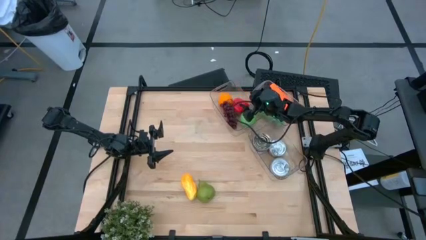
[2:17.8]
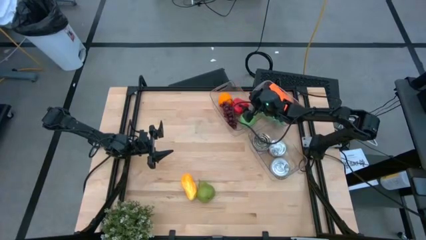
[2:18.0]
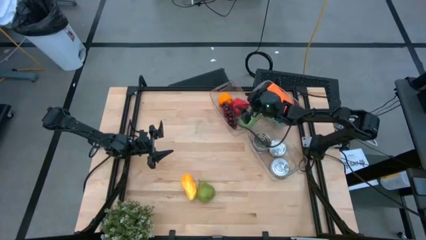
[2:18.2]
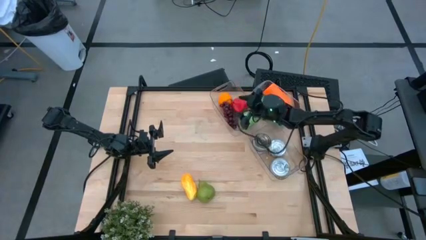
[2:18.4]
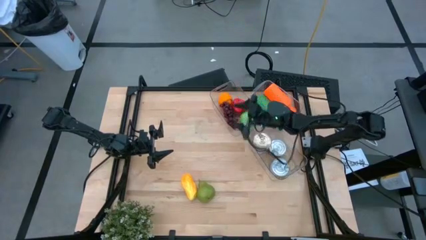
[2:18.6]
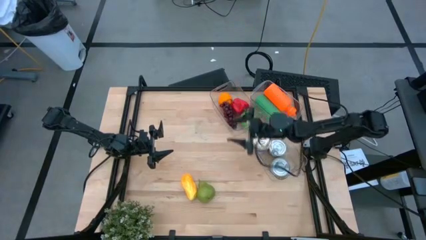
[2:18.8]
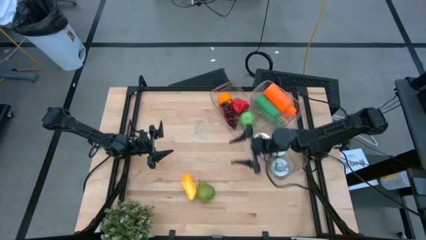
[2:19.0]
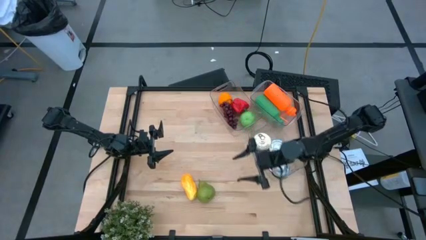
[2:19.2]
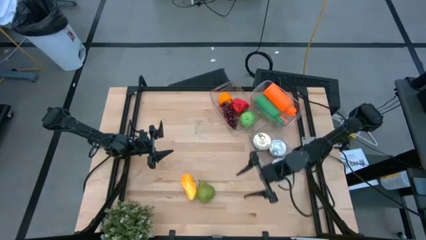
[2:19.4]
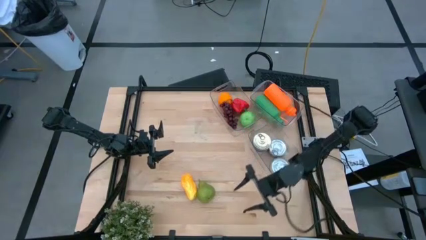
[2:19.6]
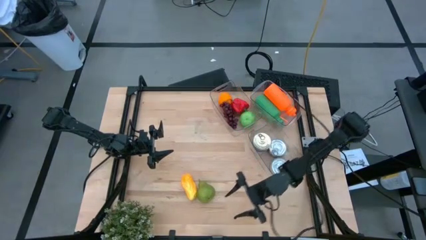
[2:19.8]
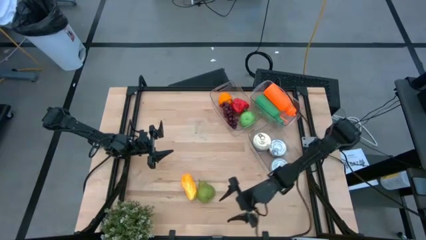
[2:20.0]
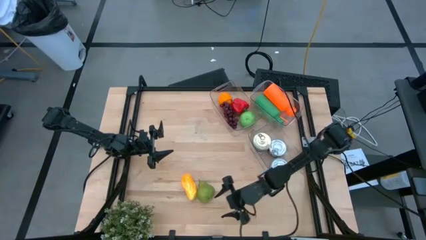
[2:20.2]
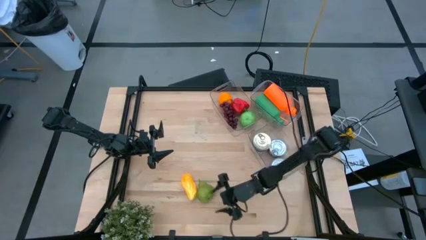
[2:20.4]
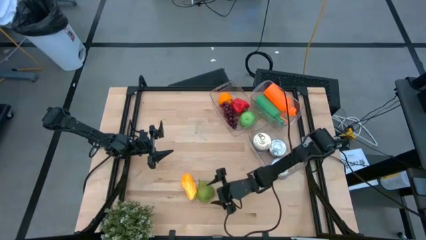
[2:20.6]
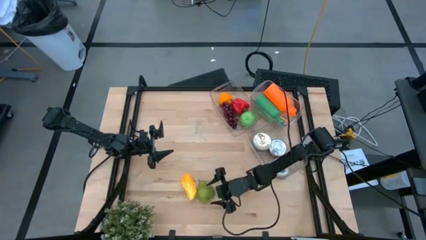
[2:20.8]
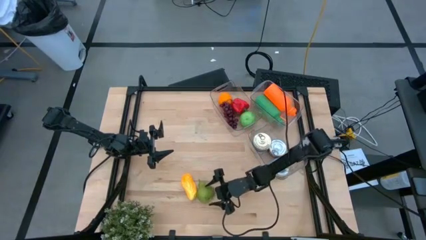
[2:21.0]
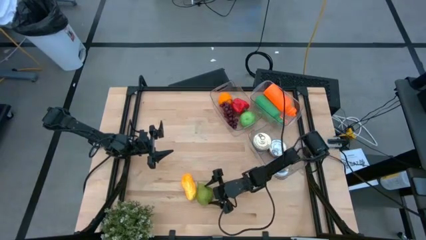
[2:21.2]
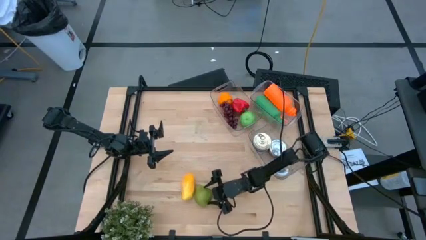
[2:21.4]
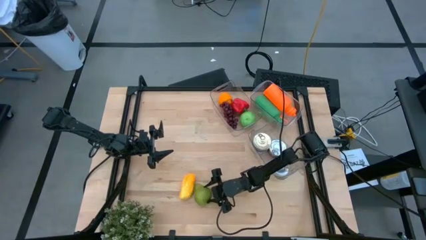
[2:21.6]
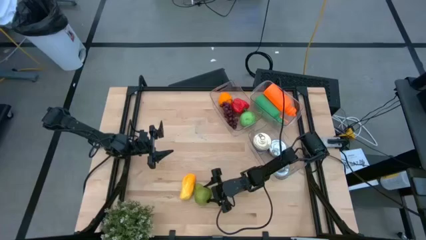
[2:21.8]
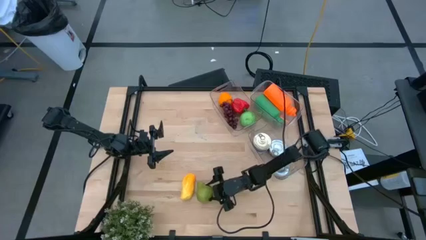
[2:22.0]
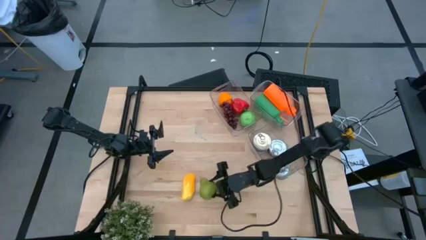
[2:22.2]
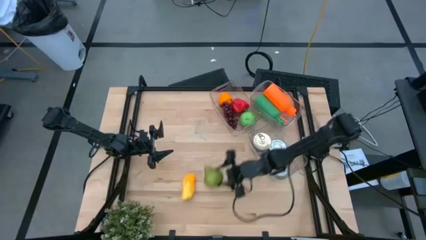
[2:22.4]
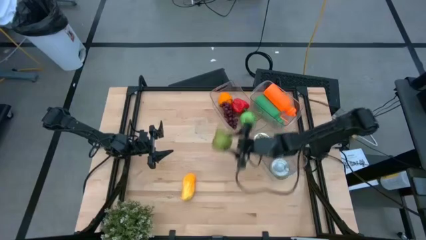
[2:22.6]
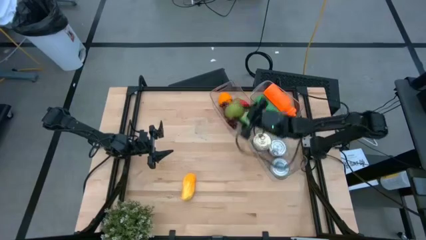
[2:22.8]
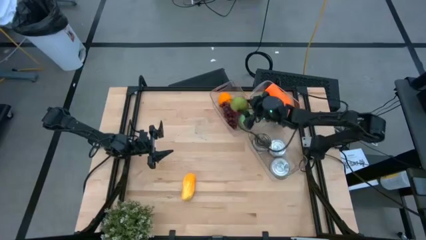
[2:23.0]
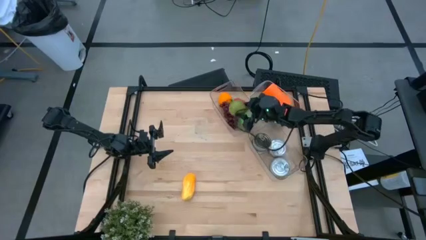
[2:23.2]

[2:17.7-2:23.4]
Task: Pick & Place Food Item
Put the green pear into the top left transparent bin

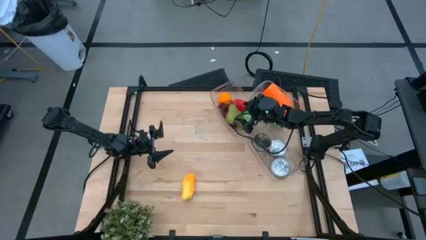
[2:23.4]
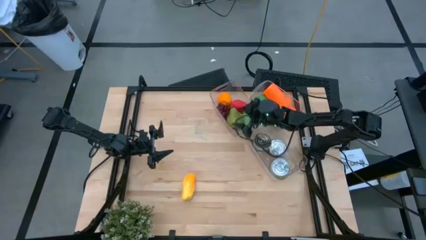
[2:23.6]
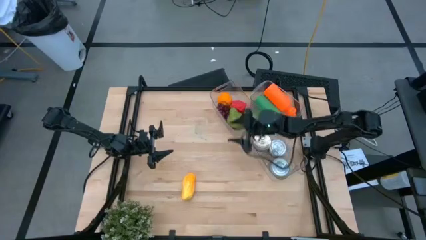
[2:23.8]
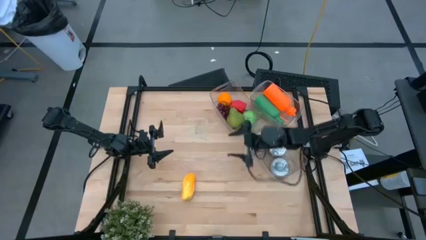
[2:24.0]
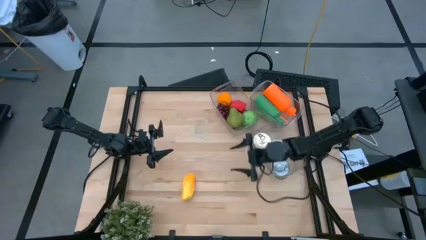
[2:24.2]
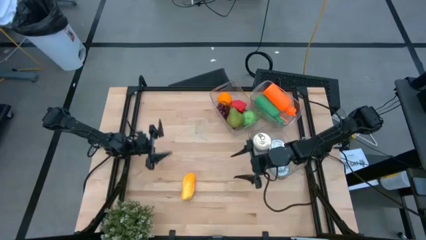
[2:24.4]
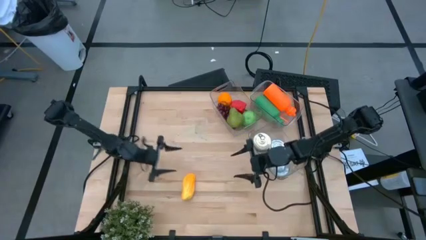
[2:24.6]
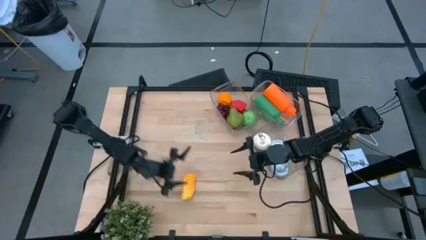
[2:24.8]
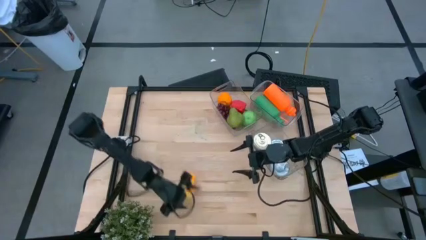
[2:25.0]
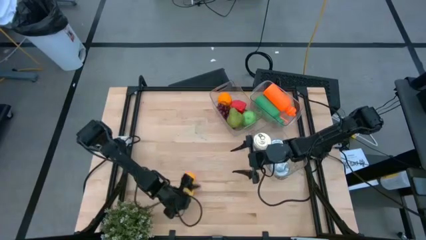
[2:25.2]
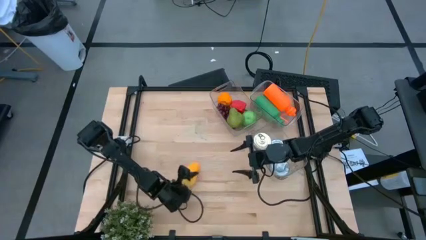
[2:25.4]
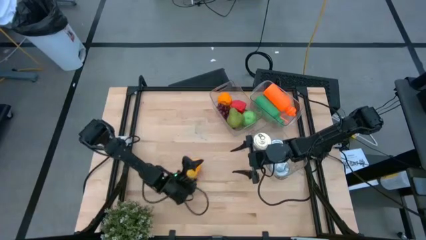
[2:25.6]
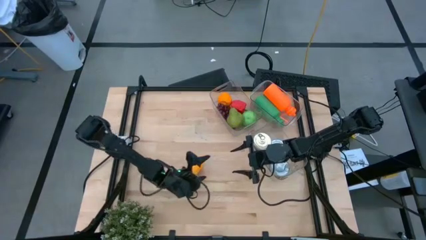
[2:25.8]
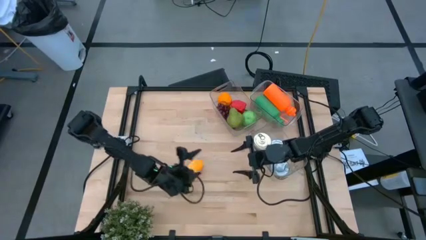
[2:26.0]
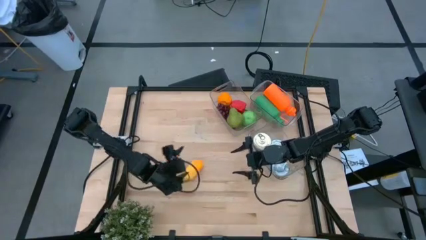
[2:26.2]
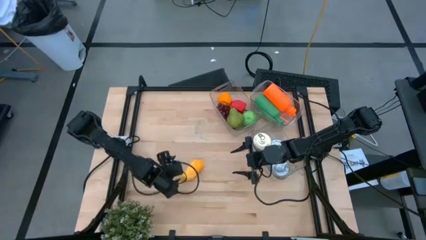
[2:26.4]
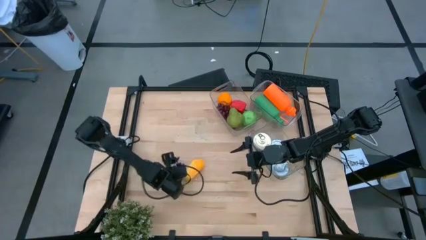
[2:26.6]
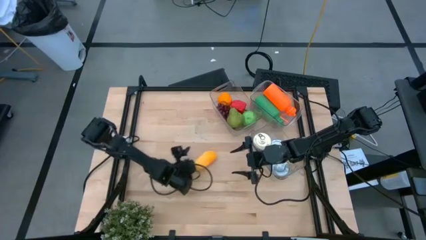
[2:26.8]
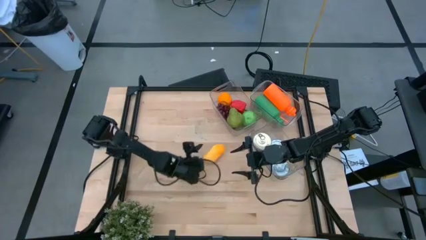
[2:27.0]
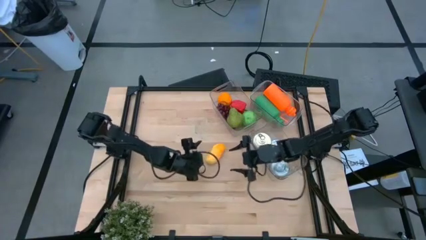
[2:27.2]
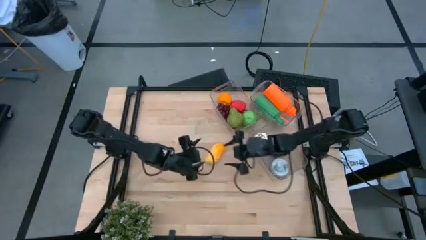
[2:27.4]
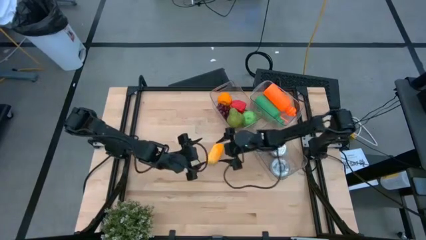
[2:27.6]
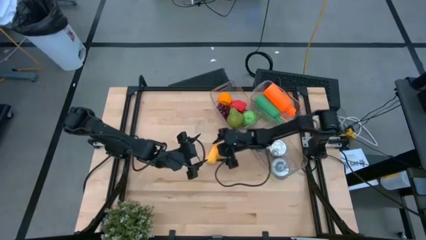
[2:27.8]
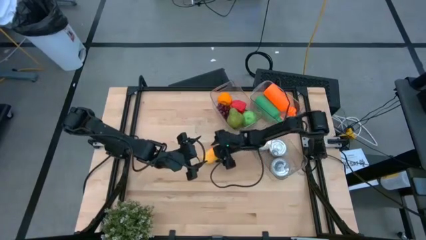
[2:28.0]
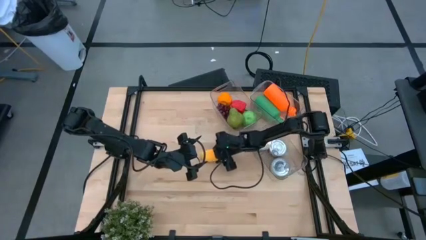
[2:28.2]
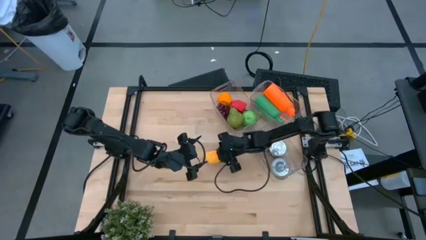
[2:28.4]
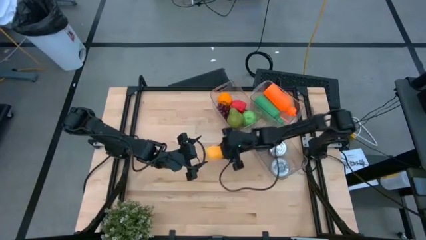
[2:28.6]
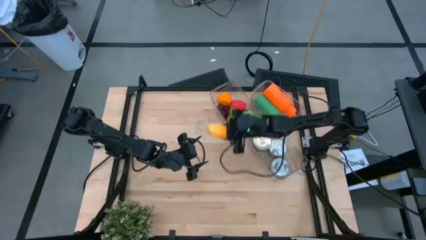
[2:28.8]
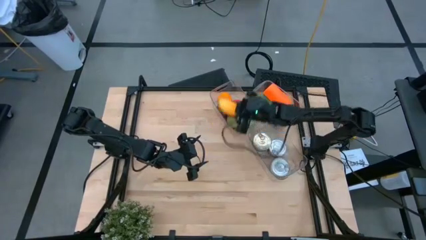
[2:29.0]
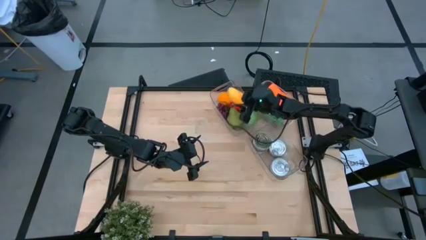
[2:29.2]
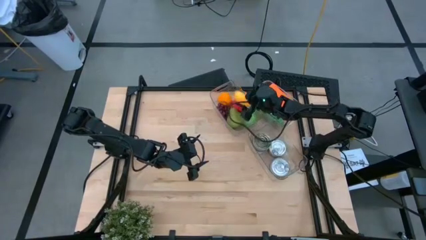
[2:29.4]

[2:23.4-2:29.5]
Put the yellow mango into the top left transparent bin

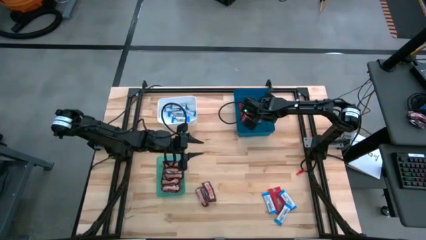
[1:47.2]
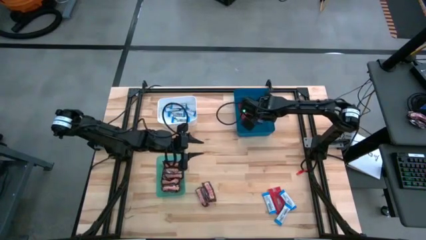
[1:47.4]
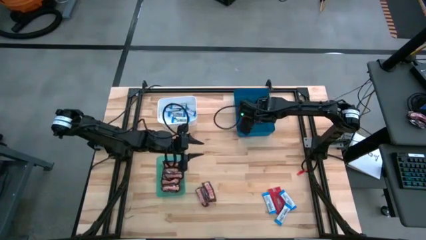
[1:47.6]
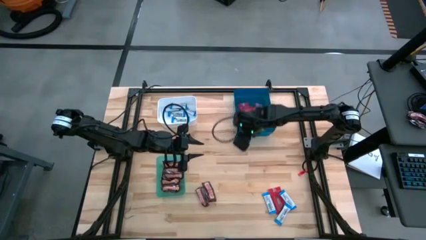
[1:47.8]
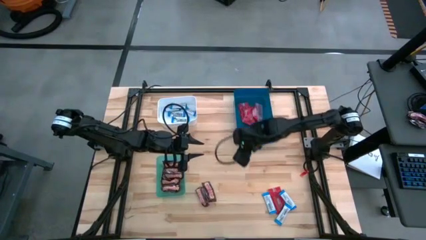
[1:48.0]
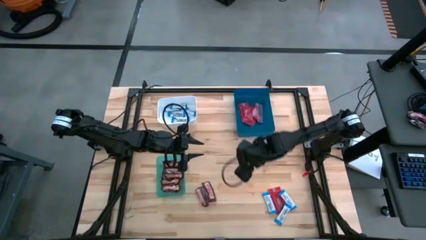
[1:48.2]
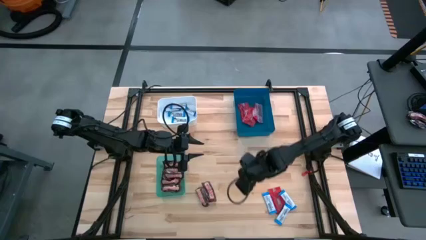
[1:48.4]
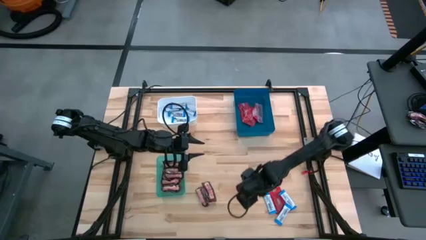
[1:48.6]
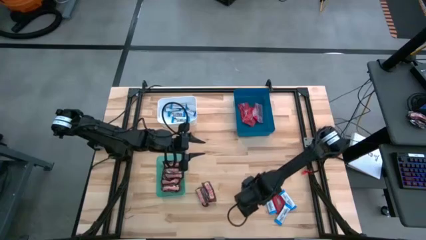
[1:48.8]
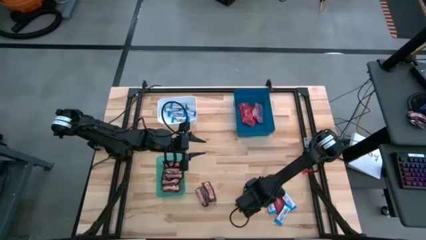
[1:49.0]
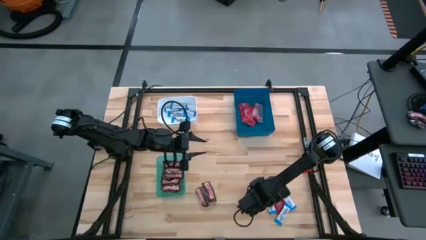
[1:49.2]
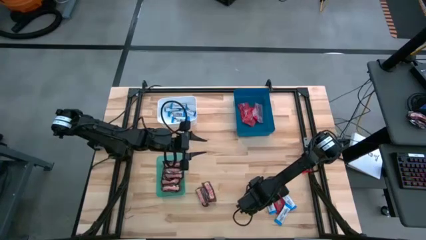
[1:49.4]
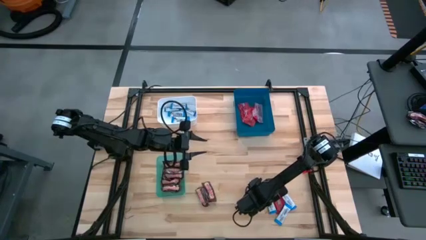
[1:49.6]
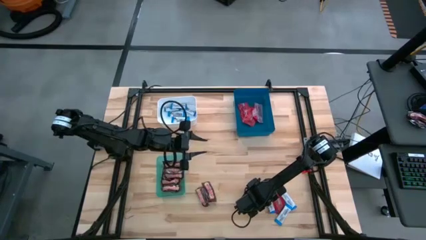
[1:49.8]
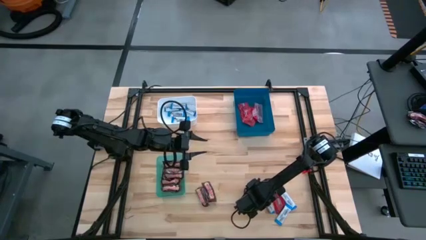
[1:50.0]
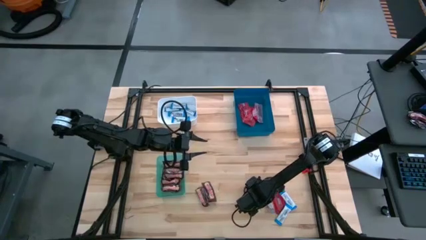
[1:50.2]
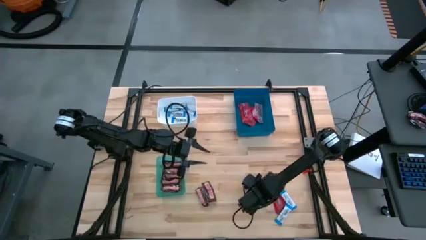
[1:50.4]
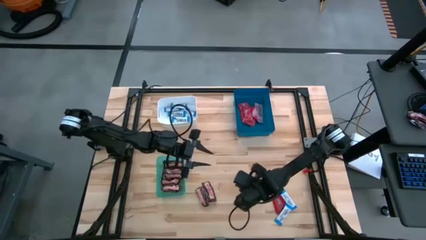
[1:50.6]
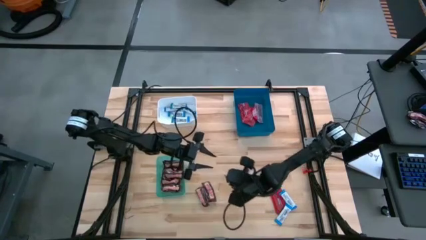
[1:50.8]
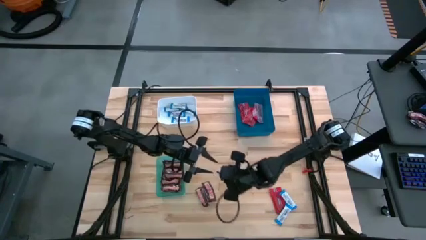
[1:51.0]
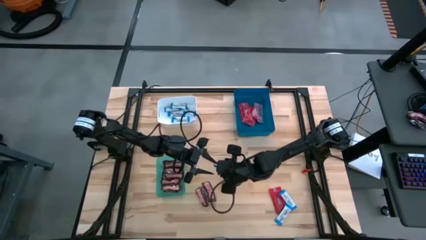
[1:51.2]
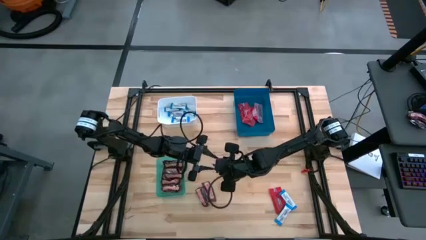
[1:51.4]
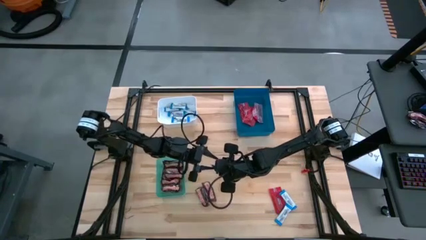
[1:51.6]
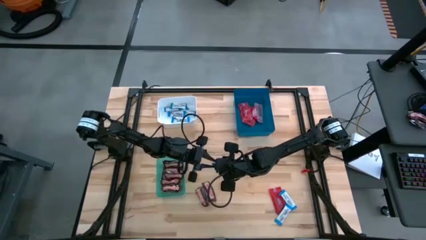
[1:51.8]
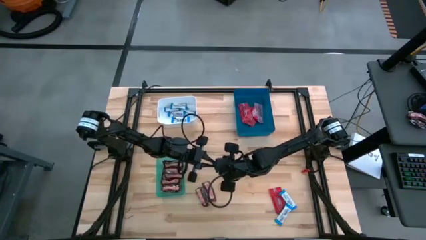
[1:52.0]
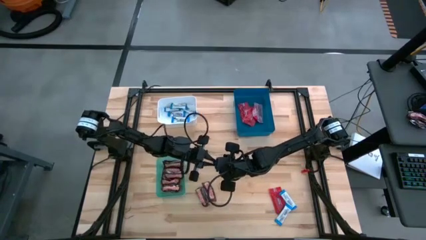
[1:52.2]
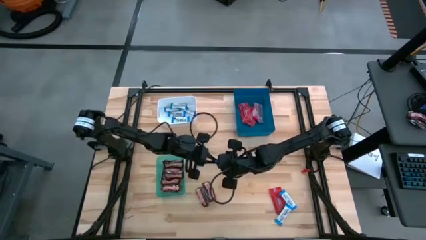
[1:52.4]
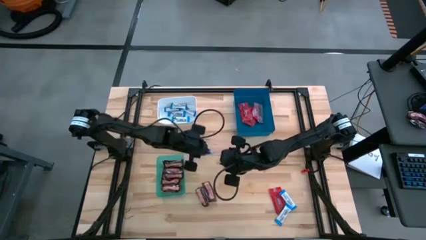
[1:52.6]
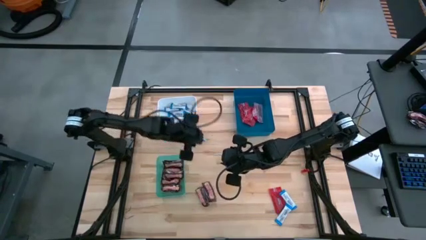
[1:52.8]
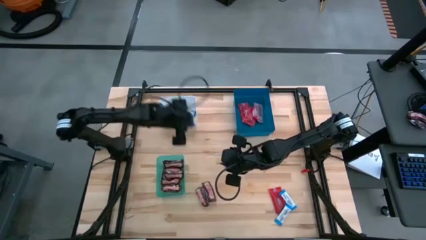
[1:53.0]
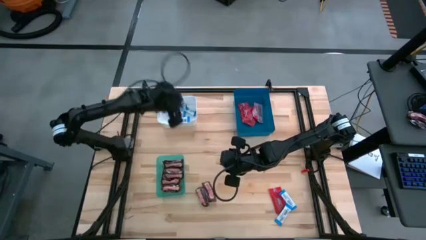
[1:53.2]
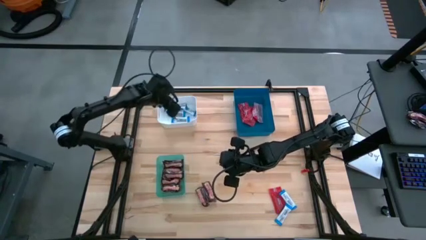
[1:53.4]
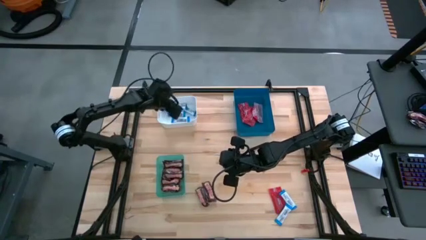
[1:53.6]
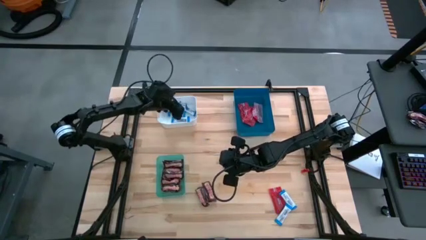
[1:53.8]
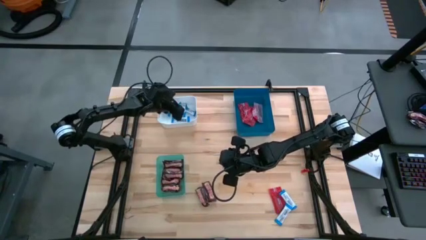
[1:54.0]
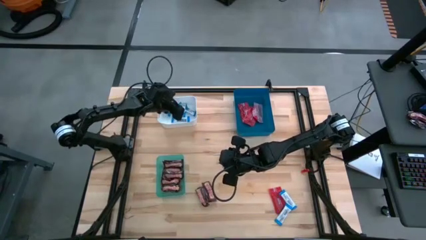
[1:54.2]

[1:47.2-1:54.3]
Task: Sort candy
Put the white chocolate bar into the white bin
